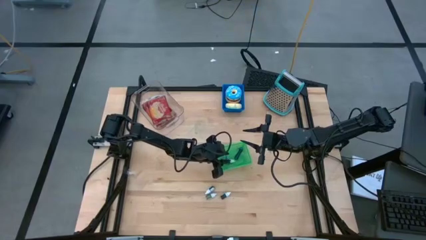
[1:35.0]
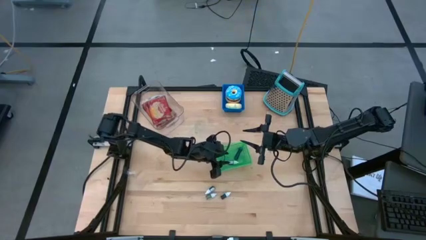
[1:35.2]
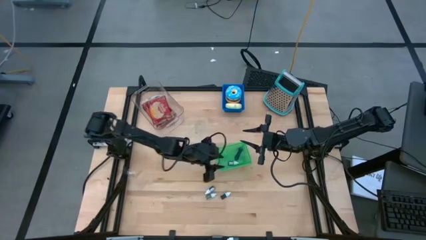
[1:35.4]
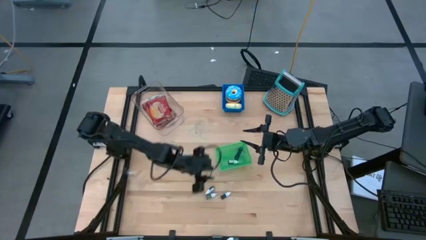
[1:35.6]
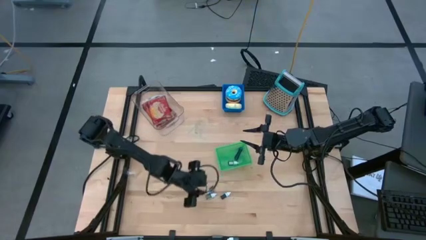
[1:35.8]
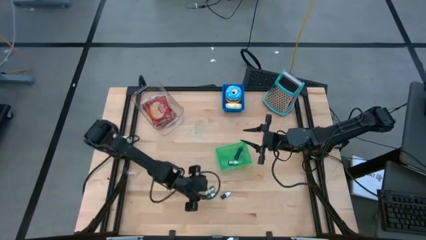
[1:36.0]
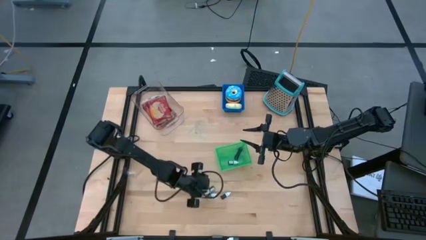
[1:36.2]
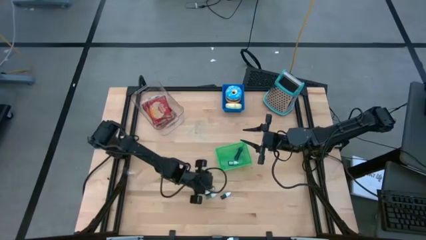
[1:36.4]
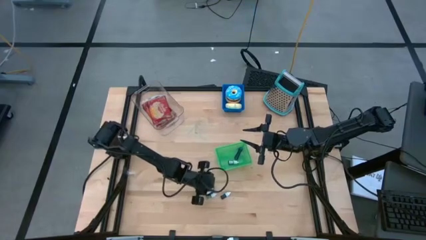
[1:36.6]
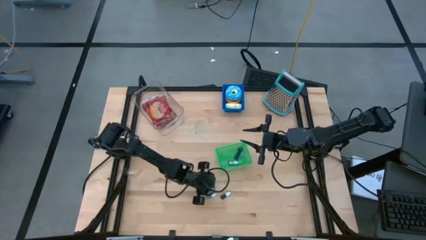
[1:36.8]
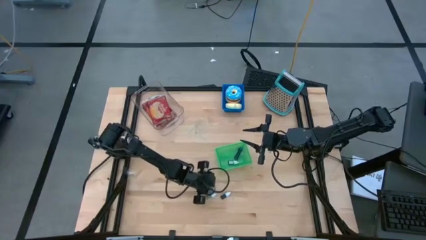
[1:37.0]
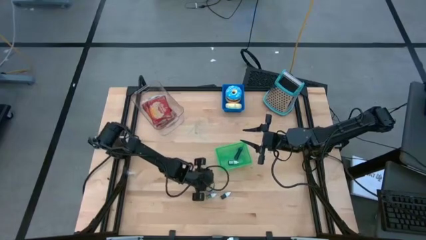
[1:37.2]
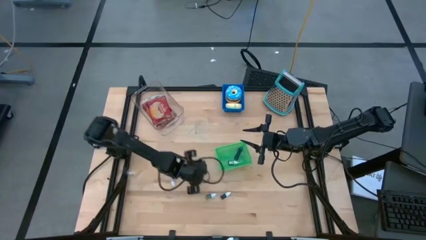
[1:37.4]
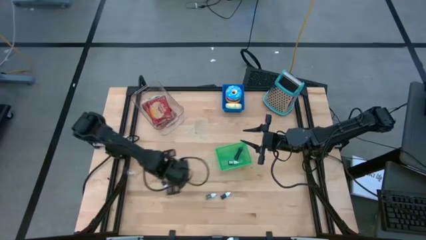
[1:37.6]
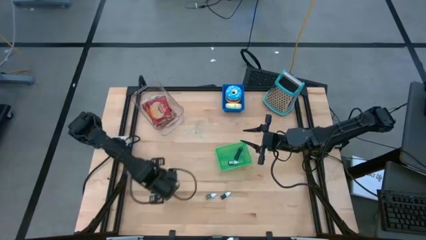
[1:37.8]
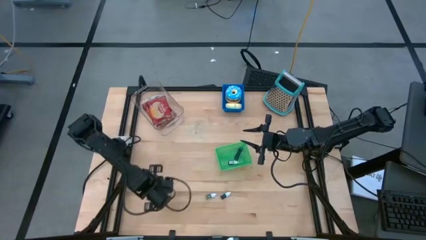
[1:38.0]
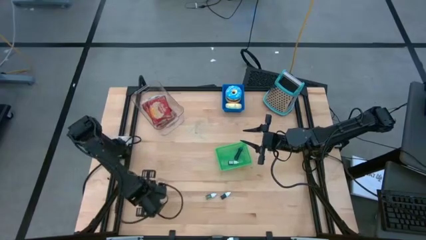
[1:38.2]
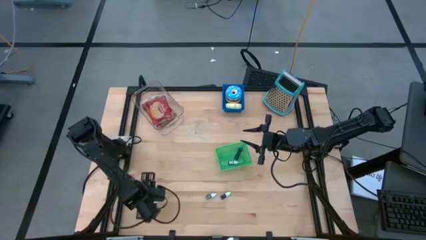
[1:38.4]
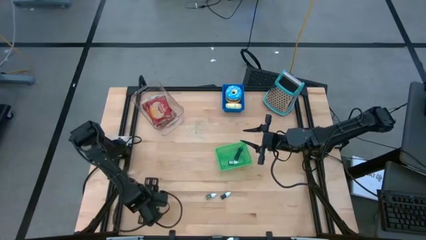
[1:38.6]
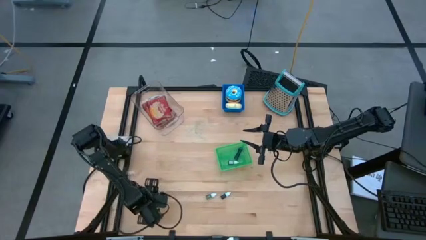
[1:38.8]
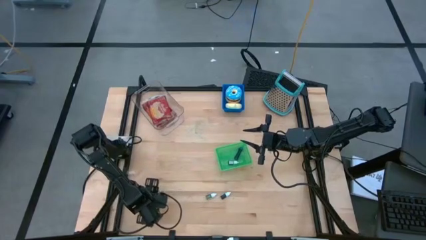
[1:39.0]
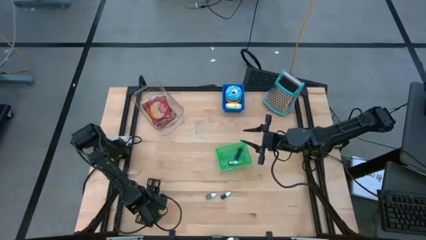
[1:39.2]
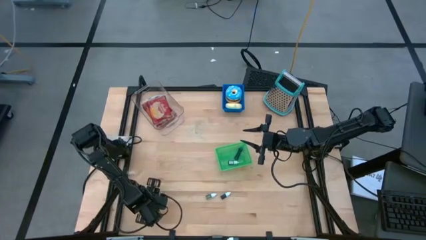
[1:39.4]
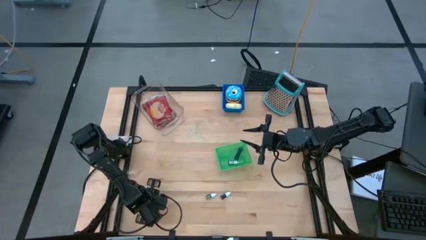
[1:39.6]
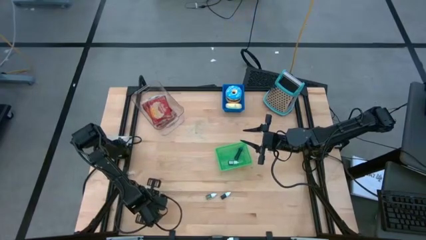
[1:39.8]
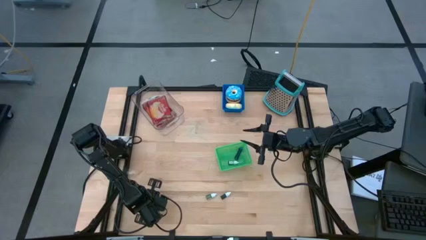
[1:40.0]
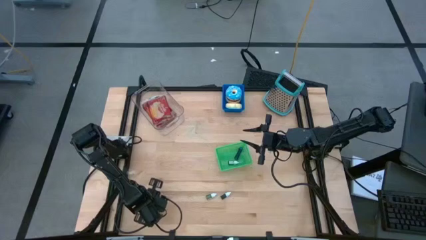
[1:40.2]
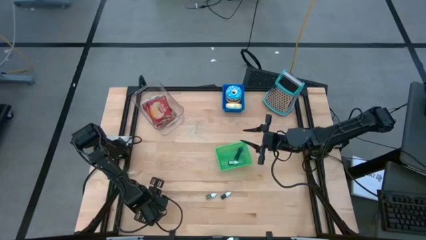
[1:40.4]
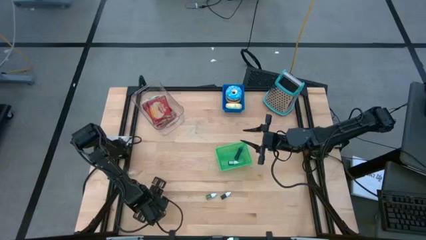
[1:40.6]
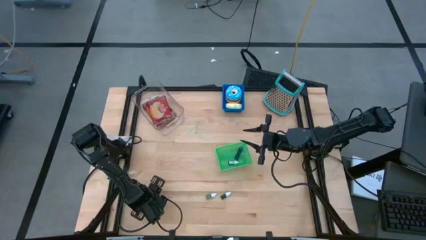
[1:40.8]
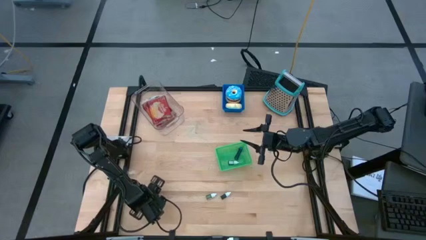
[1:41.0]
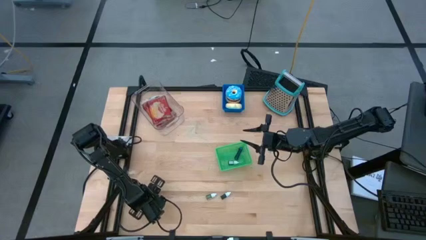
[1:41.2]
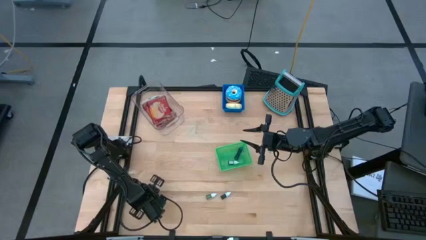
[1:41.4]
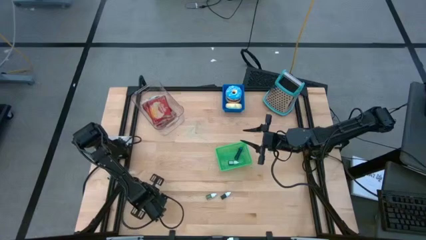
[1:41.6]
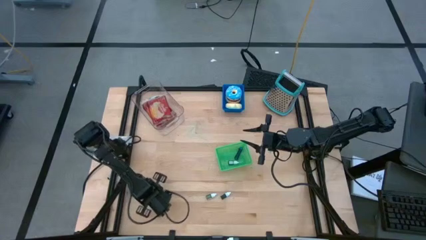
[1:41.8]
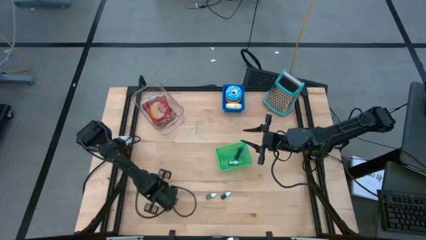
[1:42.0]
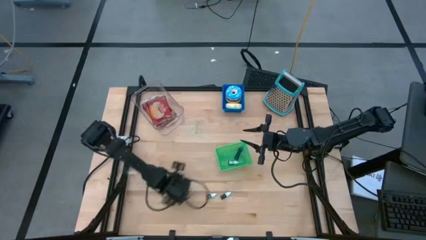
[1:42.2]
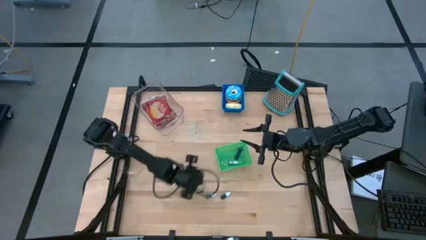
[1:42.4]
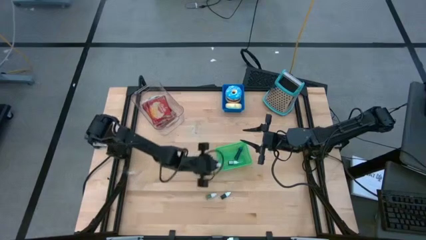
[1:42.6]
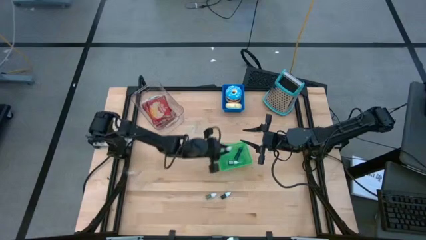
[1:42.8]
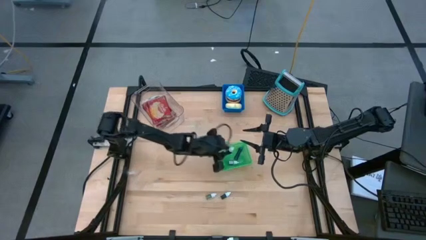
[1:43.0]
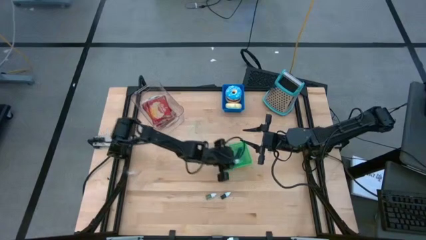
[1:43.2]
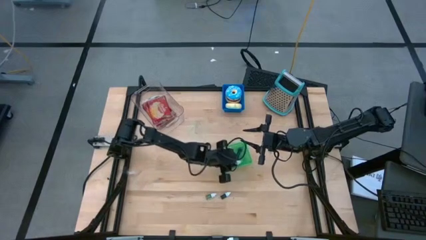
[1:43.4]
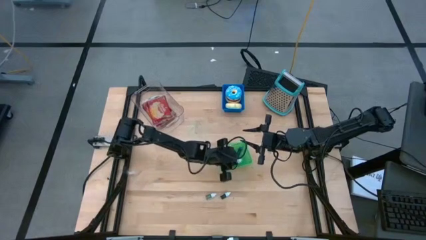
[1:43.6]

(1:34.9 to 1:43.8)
Put the violet food coloring bottle into the green bin

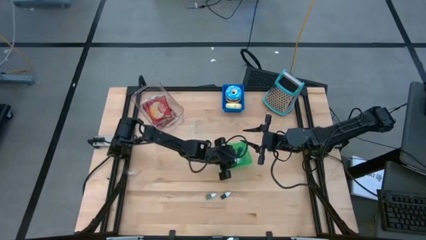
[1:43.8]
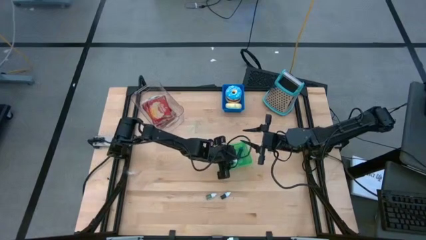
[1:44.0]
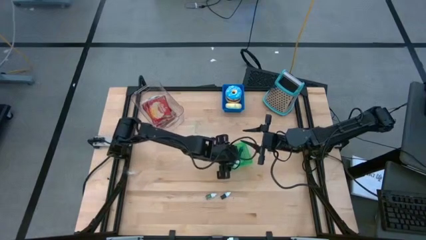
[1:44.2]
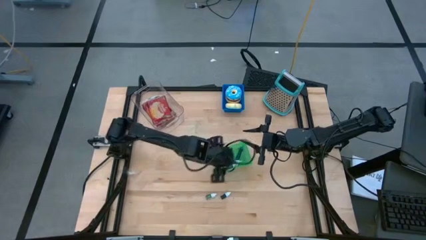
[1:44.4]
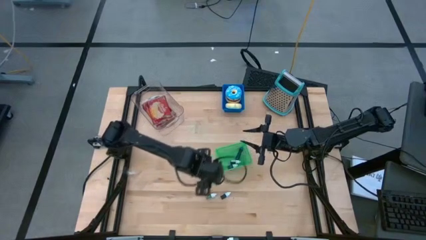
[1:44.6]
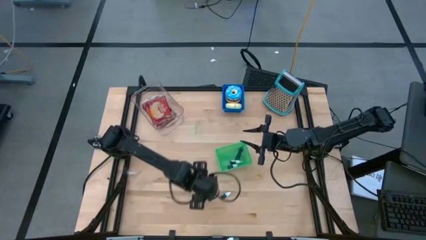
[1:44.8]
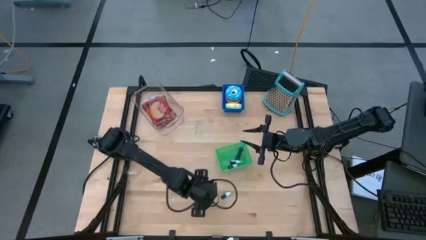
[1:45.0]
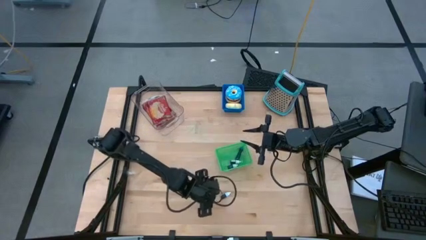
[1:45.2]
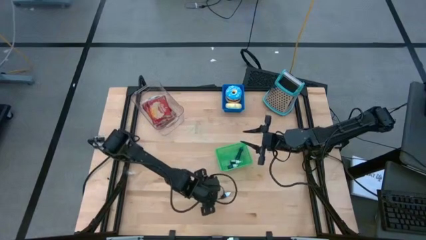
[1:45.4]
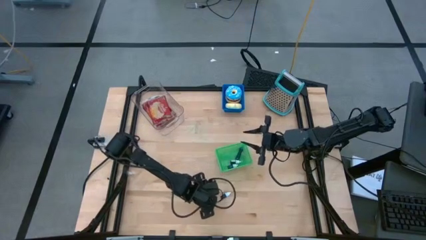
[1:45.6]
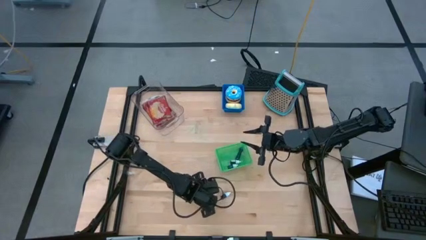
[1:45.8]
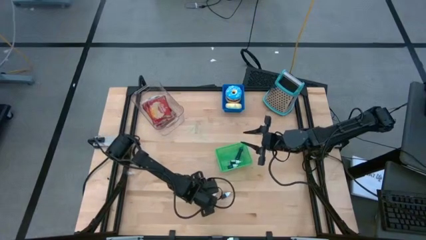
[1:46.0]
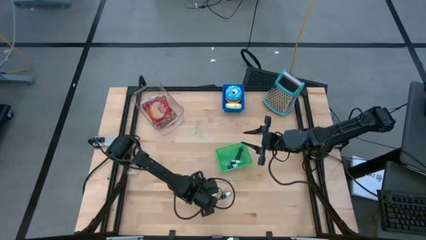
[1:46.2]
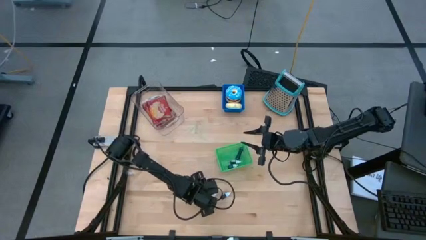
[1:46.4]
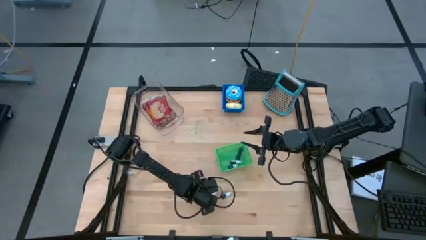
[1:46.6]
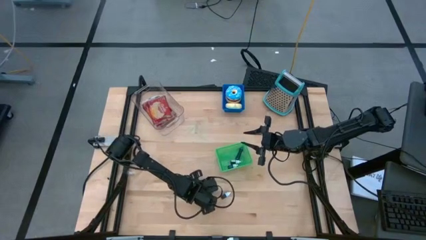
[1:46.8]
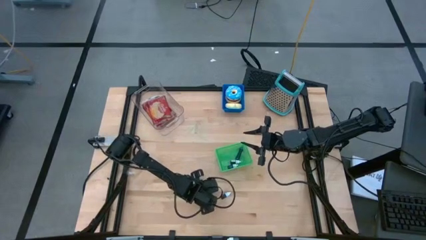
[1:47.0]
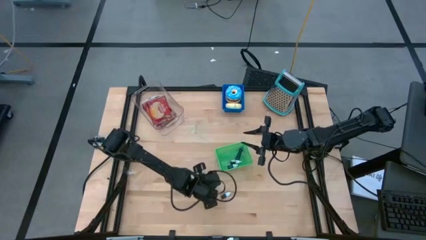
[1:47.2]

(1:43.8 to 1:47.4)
Put the green food coloring bottle into the green bin

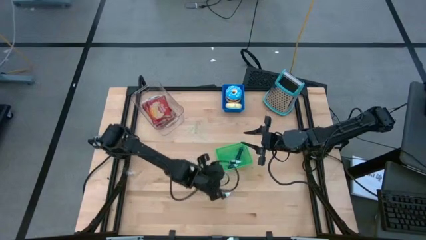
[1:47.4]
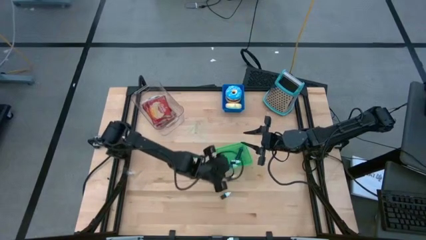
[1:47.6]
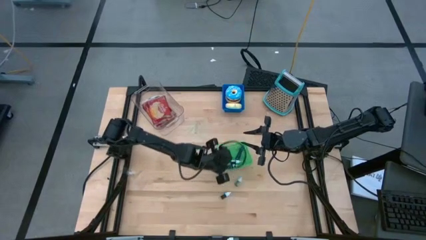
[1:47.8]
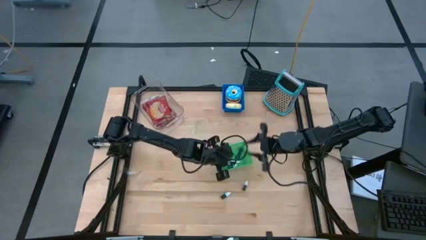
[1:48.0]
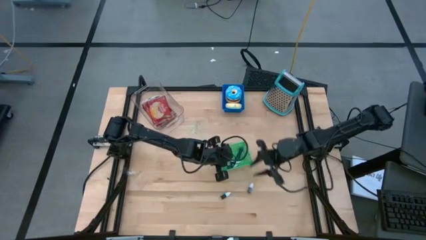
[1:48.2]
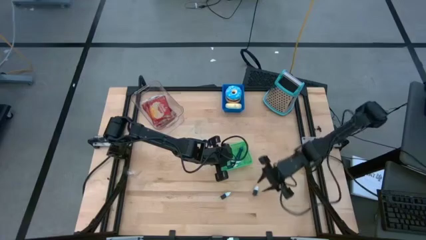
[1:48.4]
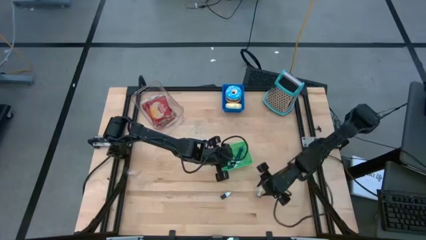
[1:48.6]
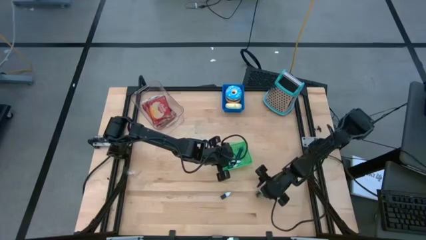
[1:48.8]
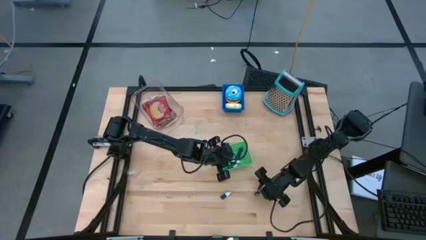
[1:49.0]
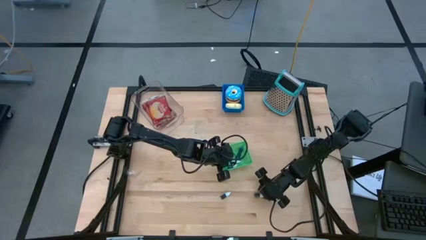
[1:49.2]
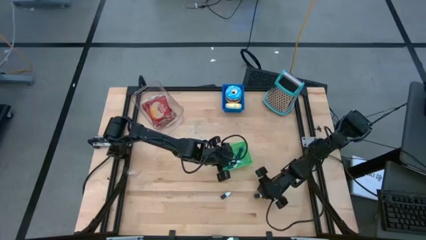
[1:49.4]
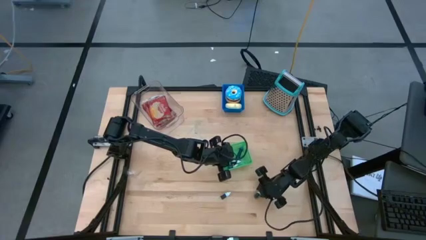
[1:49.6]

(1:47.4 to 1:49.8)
Put the green food coloring bottle into the green bin

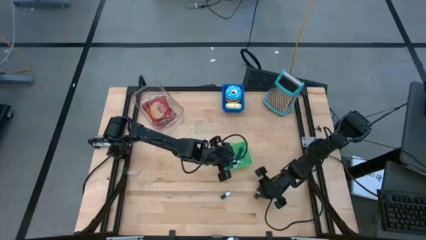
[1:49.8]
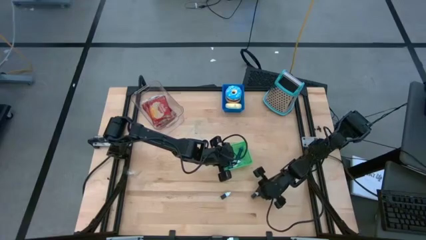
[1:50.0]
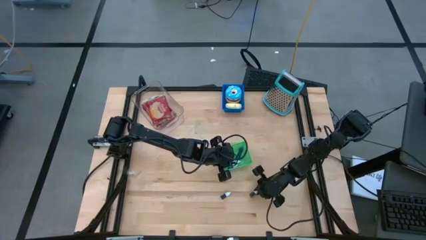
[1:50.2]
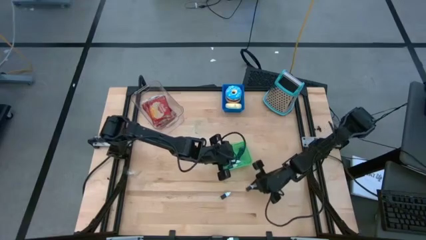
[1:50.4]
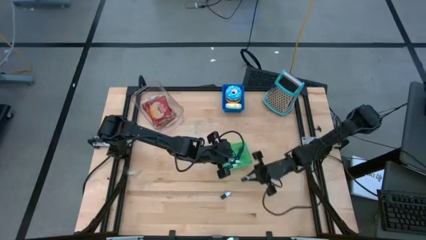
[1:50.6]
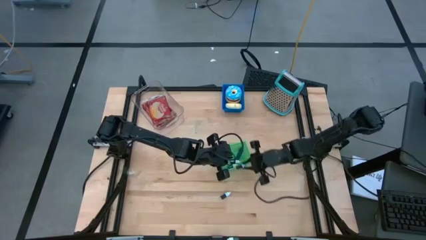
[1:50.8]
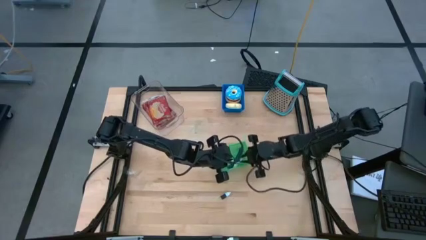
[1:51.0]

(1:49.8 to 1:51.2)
Put the green food coloring bottle into the green bin

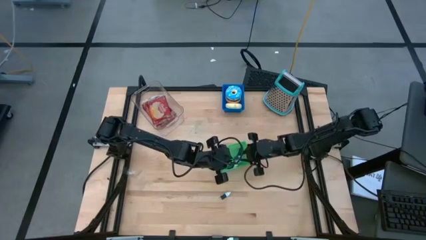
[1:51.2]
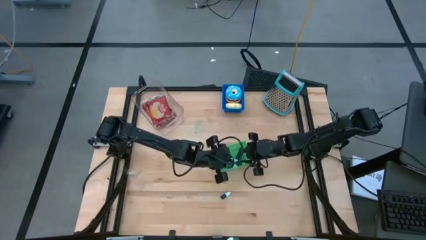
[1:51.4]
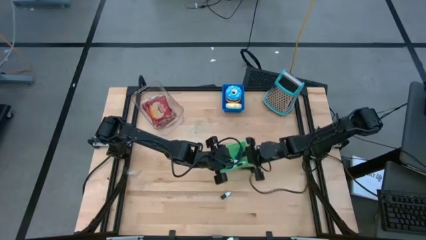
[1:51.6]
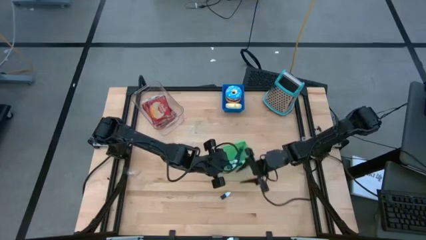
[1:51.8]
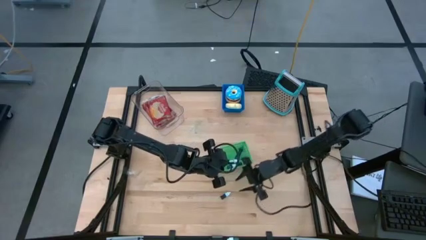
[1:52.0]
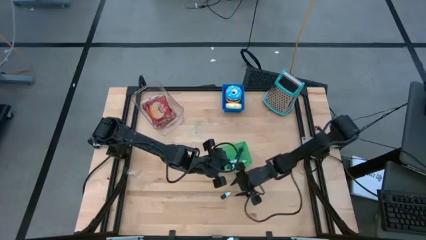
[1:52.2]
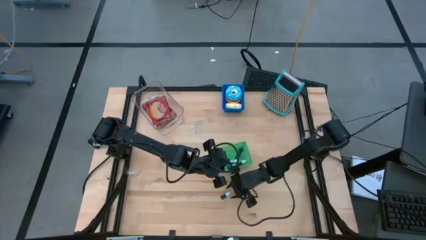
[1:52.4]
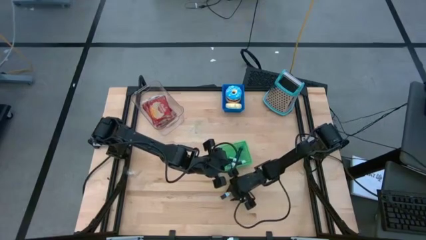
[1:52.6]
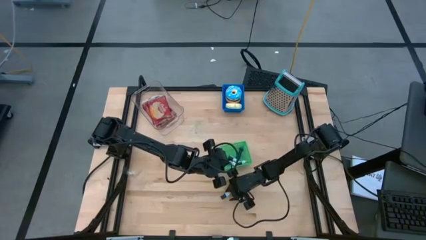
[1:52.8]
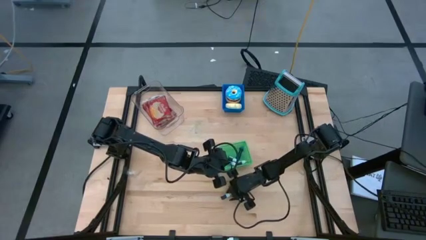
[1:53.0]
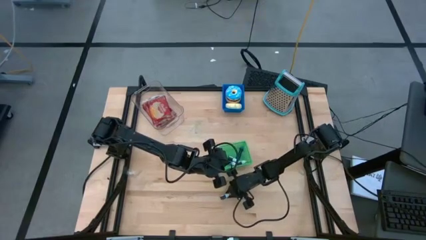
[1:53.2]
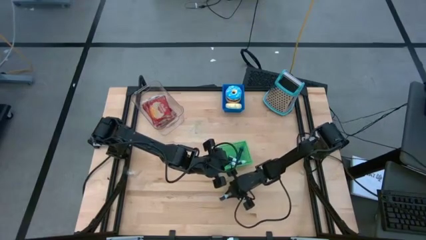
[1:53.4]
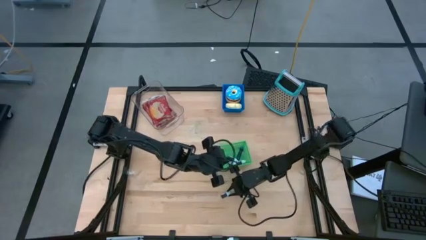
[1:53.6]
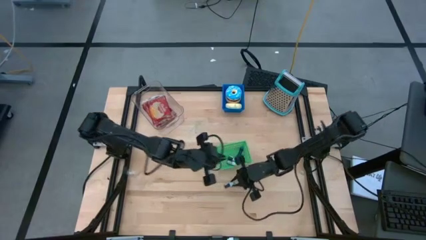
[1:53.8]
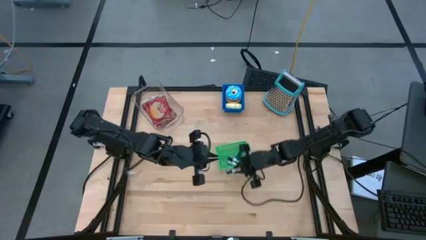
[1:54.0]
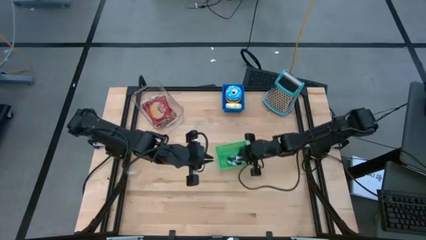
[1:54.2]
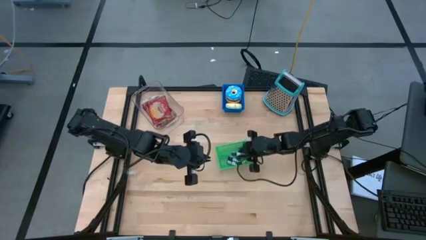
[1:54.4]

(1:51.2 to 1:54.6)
Put the red food coloring bottle into the green bin
